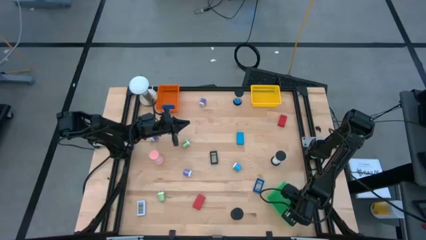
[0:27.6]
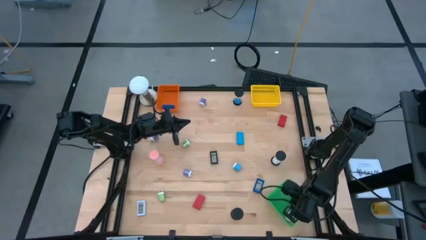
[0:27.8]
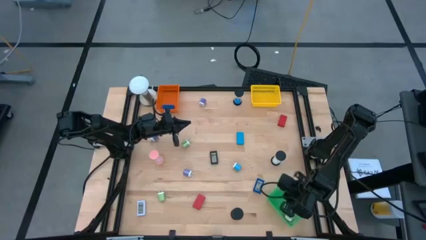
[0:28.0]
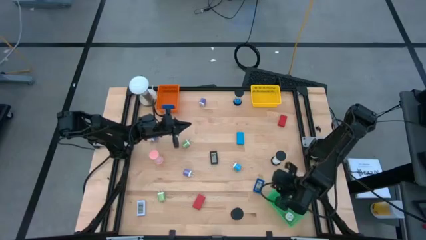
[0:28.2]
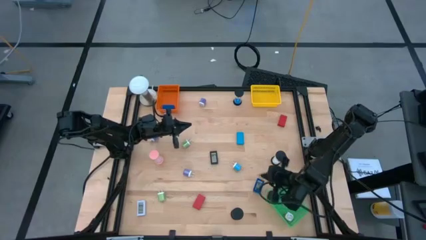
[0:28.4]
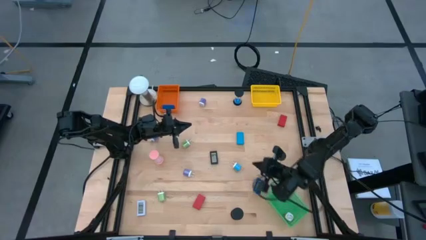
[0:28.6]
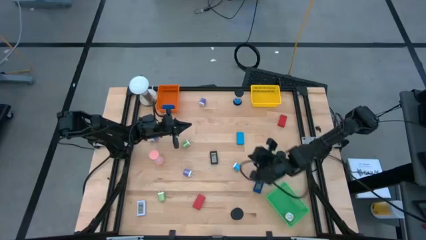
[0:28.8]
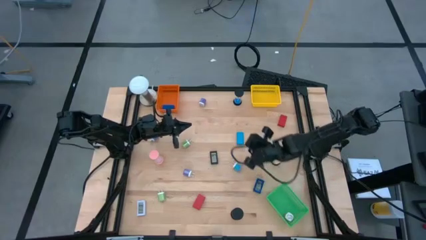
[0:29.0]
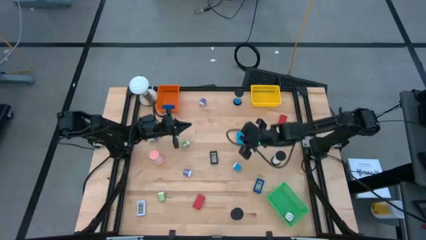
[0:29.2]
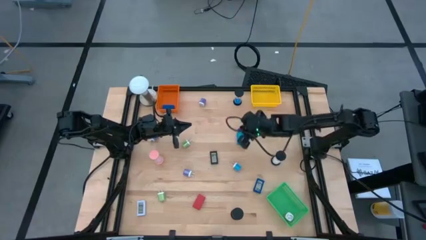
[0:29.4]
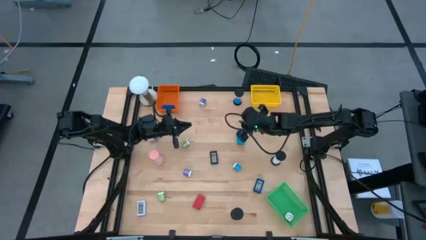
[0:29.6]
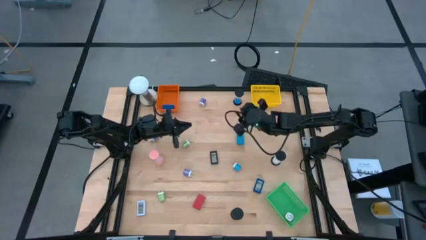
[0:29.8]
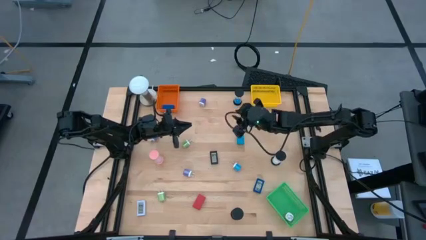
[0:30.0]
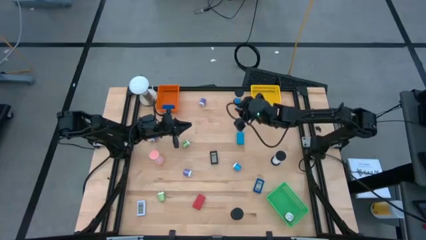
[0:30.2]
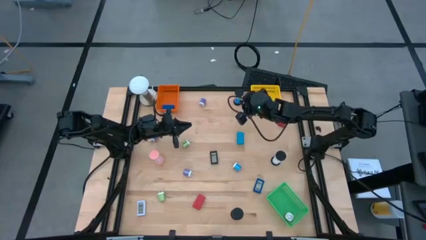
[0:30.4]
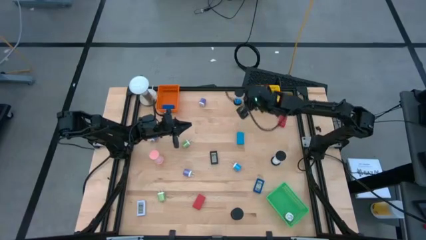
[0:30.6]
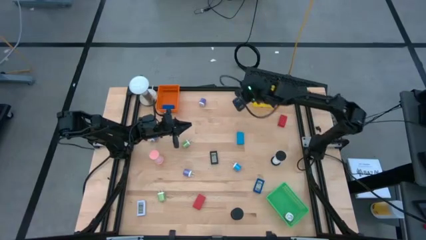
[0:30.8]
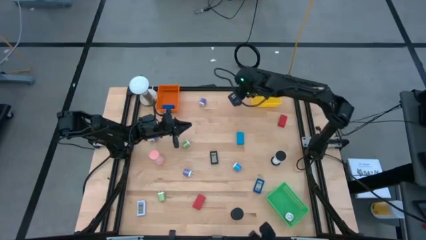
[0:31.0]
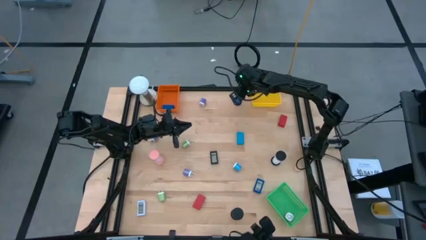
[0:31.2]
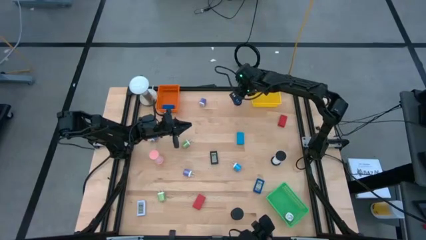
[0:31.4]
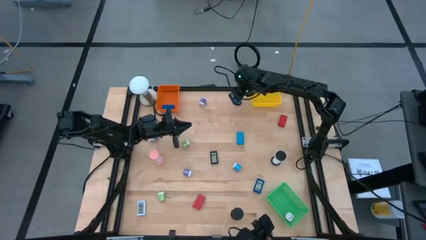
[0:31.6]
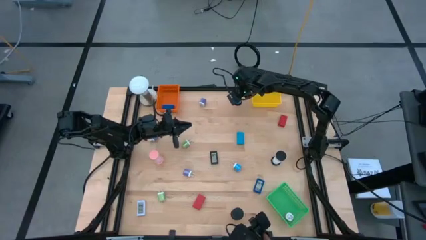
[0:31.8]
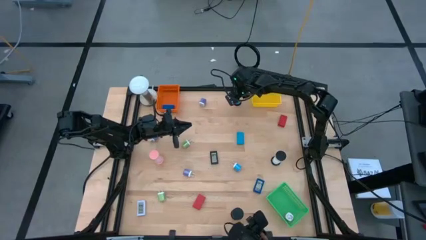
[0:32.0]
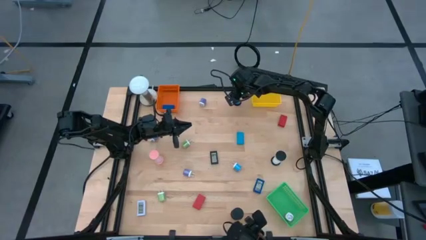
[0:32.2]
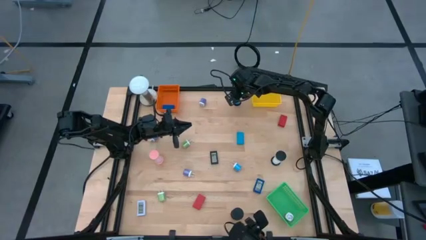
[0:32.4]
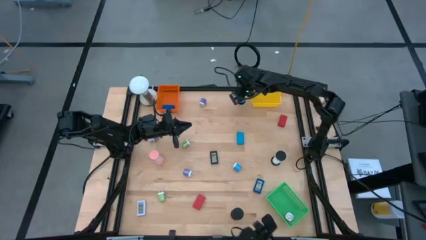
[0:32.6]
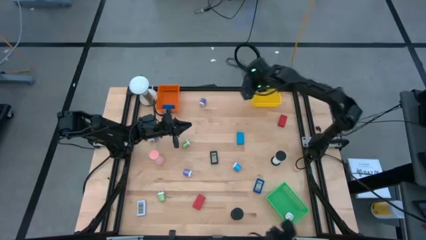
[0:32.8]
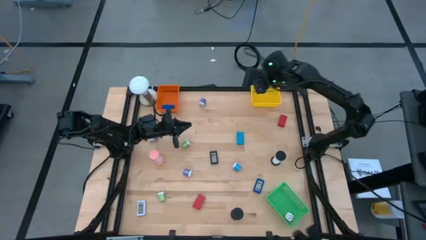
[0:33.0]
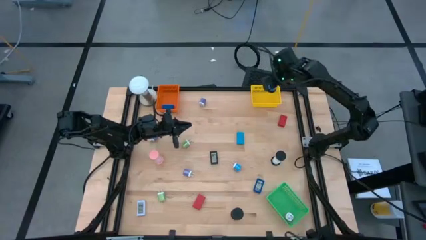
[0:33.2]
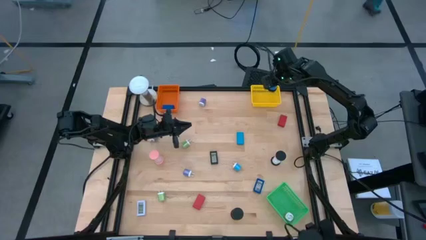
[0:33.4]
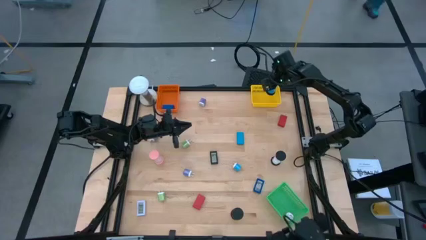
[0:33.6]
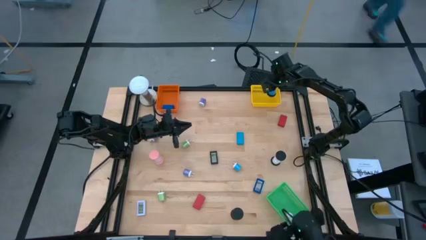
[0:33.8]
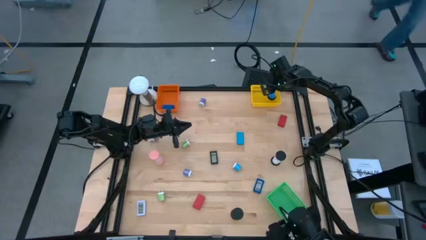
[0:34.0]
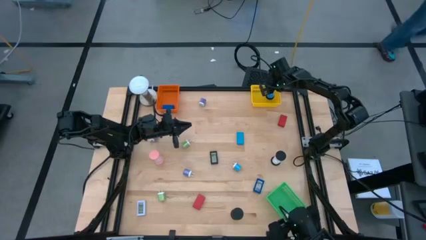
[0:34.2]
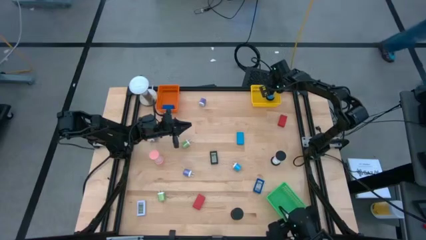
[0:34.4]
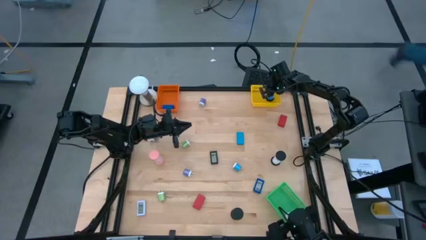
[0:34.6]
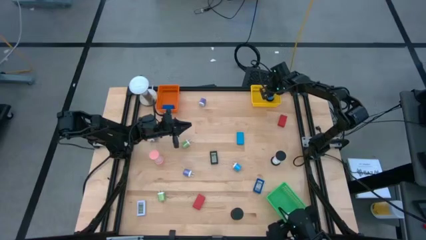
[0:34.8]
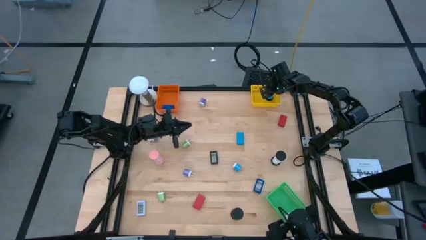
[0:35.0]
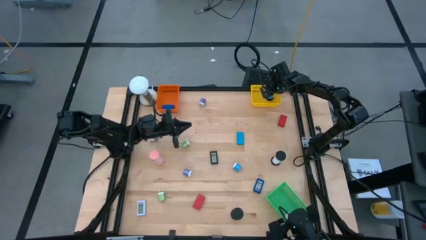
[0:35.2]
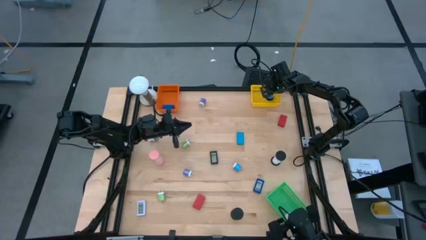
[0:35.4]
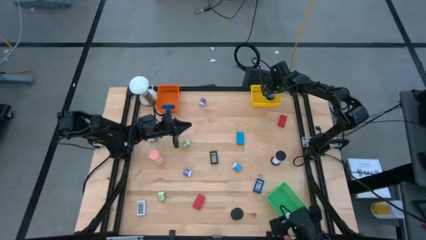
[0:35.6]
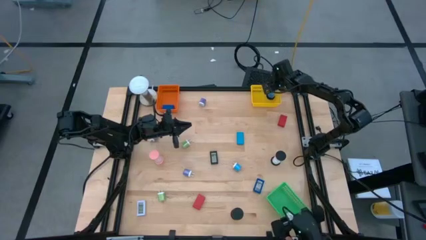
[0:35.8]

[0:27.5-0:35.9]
Task: Pick & Place Office items
Put the blue hourglass into the yellow bin

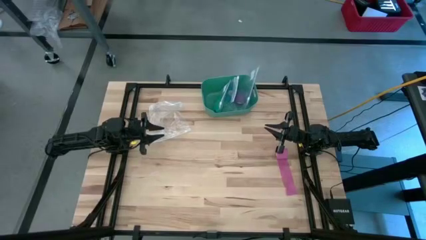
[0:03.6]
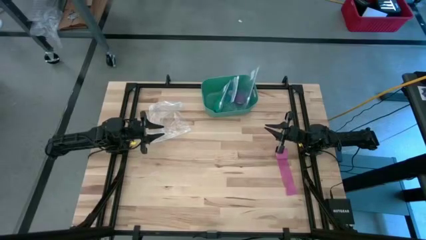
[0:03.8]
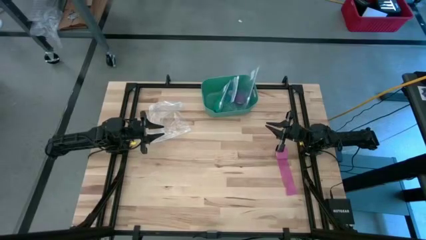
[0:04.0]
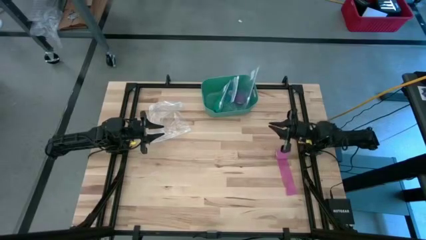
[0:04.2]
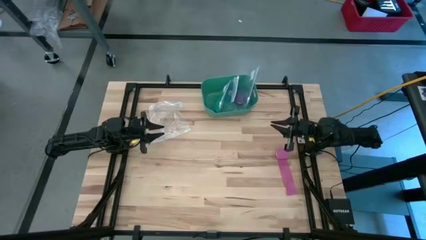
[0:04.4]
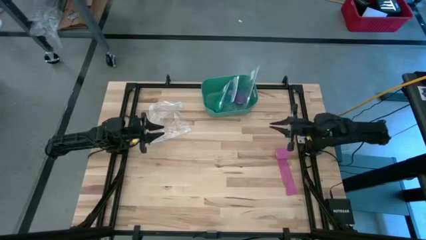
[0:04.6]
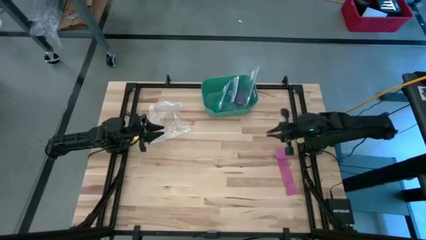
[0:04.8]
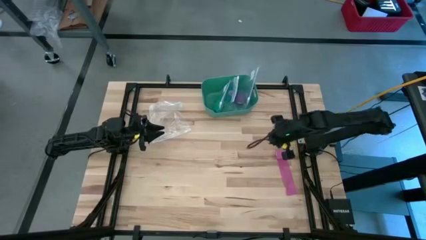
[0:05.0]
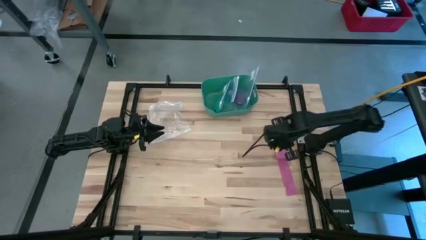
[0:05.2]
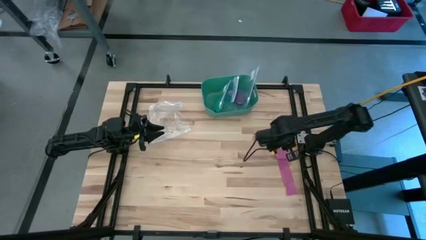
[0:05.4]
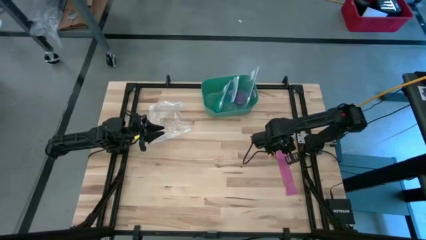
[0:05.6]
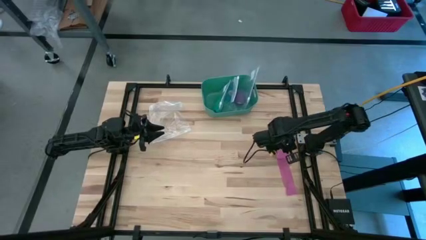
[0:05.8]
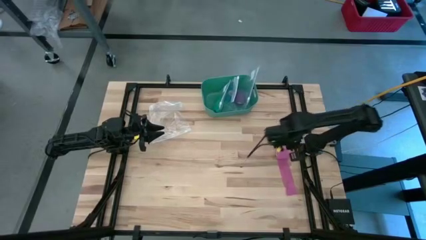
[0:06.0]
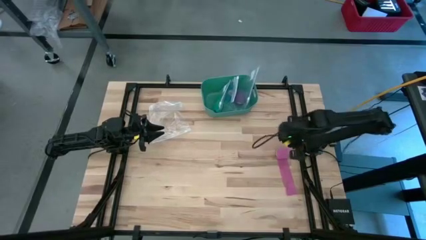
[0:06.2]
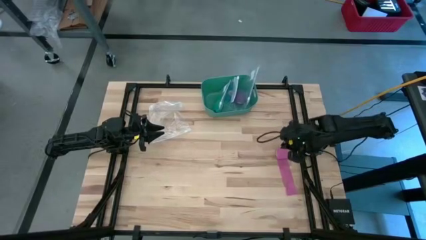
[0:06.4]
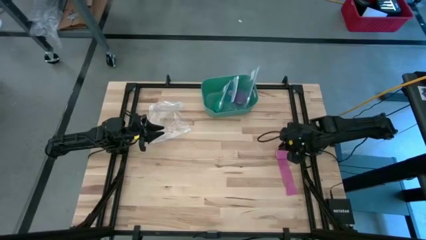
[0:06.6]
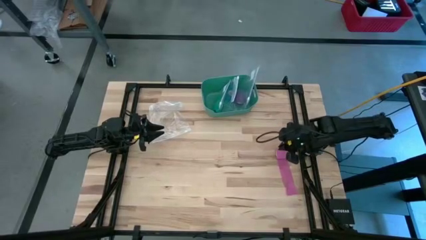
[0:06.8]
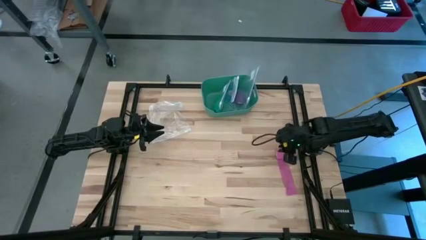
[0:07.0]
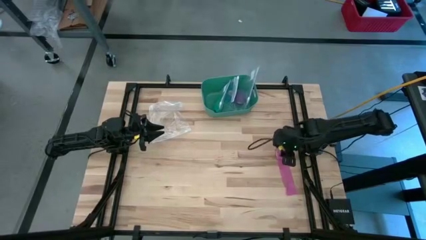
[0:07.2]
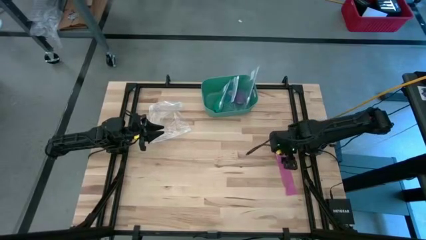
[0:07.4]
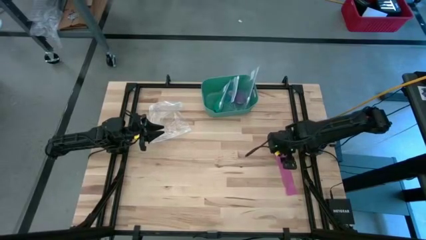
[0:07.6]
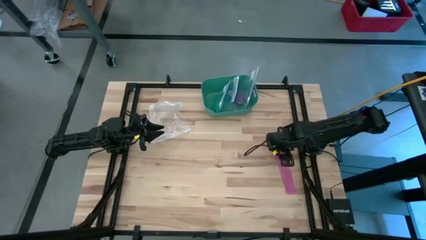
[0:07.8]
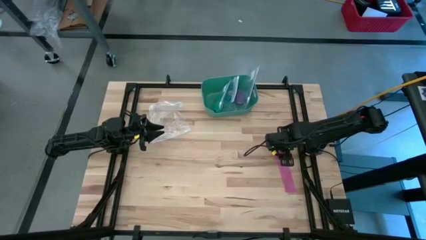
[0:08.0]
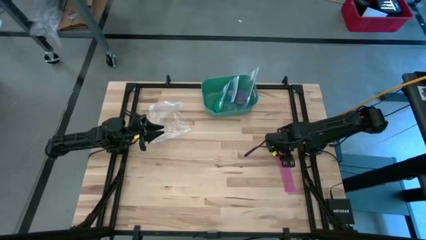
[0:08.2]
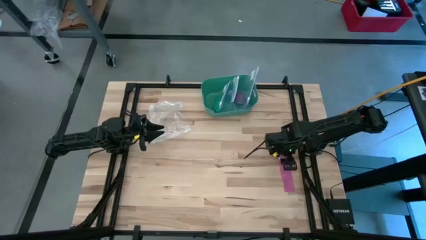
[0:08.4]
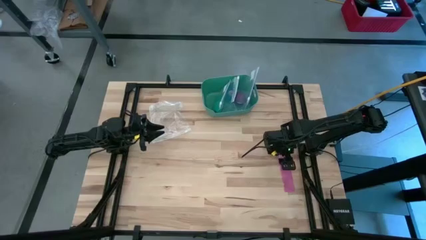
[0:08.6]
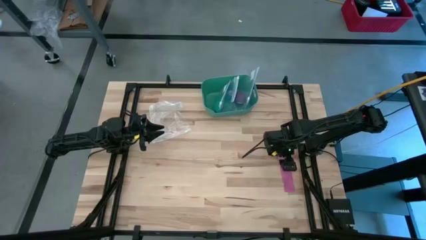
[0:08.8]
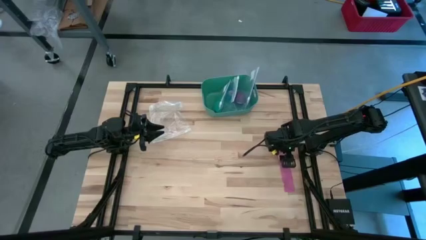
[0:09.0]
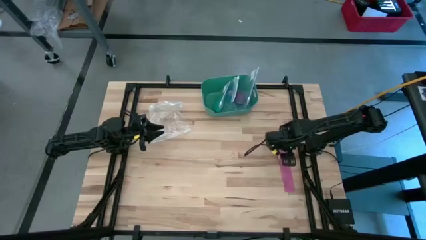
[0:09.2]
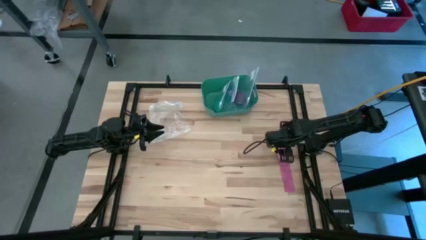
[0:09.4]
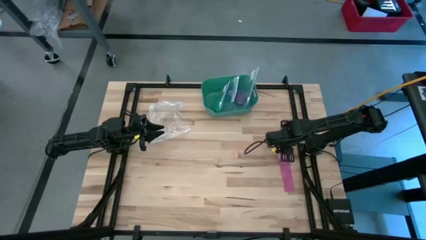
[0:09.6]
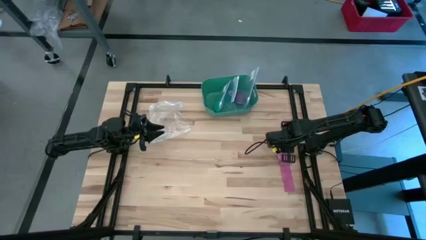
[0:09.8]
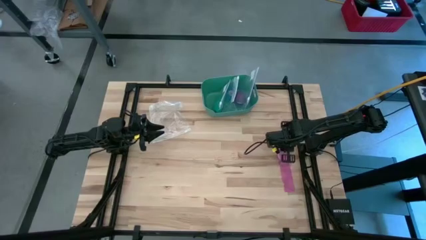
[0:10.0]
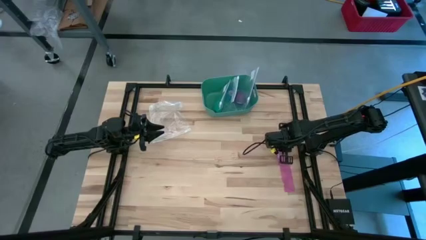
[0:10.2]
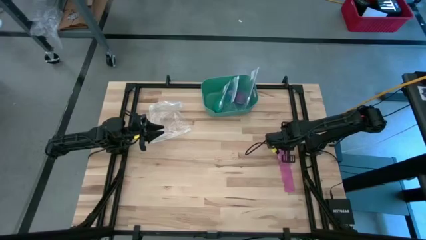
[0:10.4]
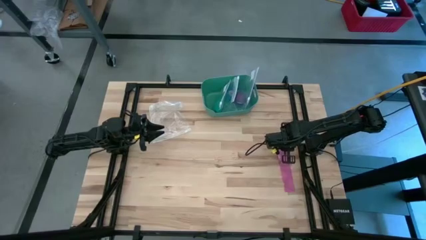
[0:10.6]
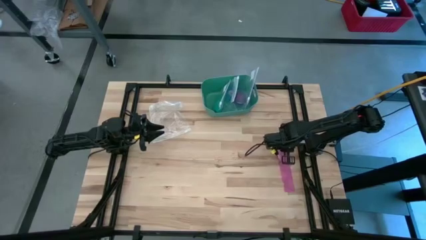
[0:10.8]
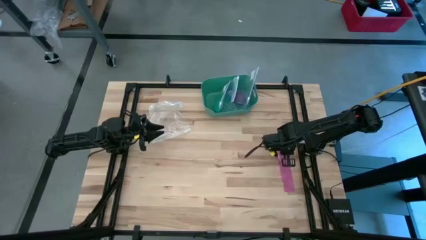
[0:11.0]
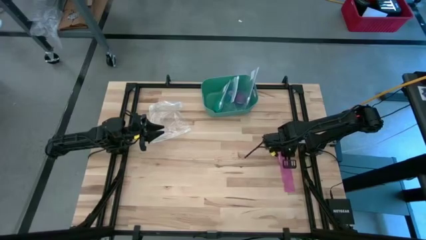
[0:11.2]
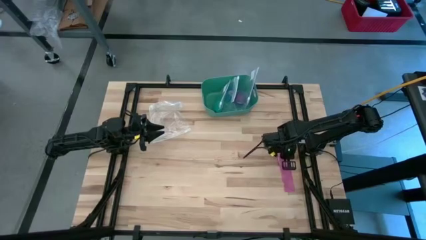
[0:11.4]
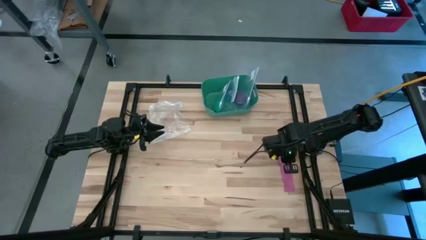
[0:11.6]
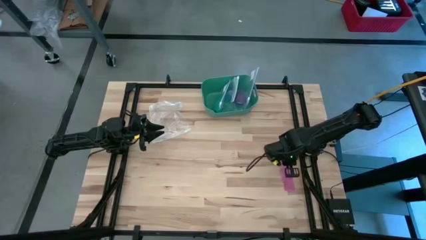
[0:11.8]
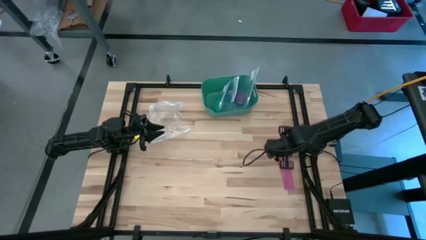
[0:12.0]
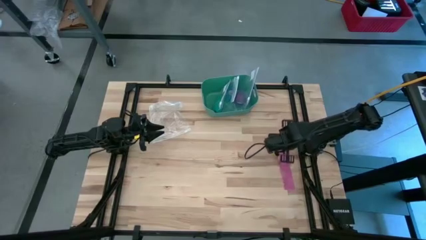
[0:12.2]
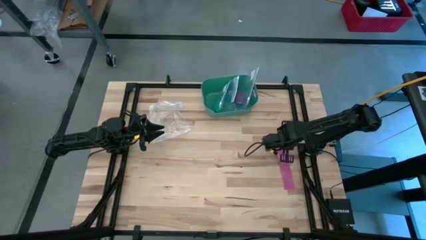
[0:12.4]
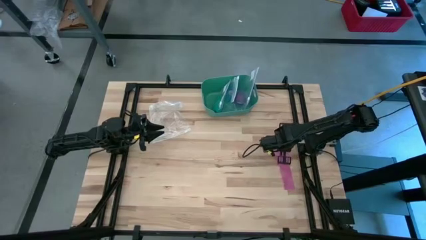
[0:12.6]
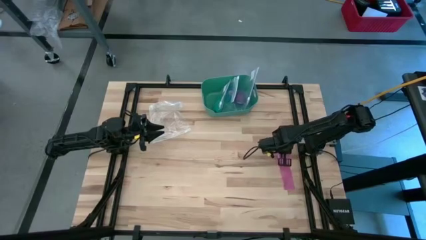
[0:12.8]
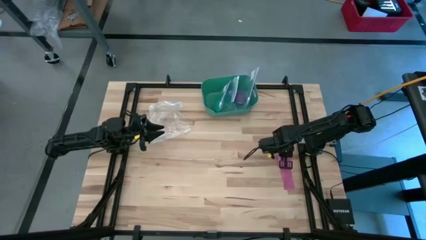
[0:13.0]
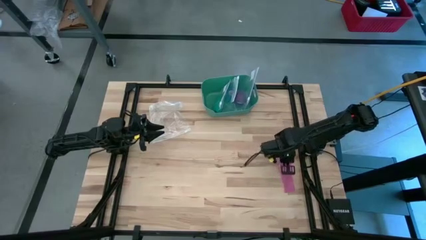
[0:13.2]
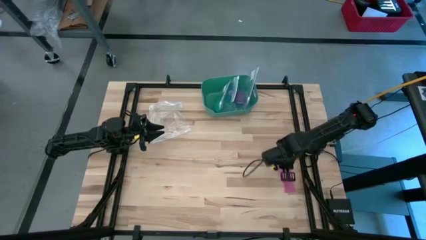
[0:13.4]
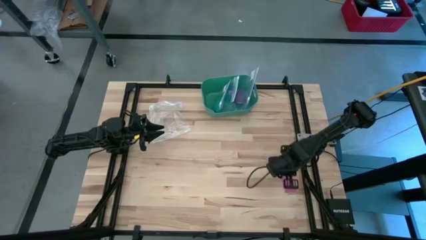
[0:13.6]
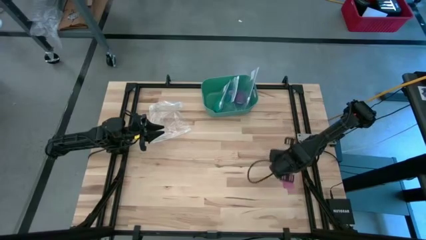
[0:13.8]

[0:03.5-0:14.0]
Task: Roll bandage
Roll the pink bandage
